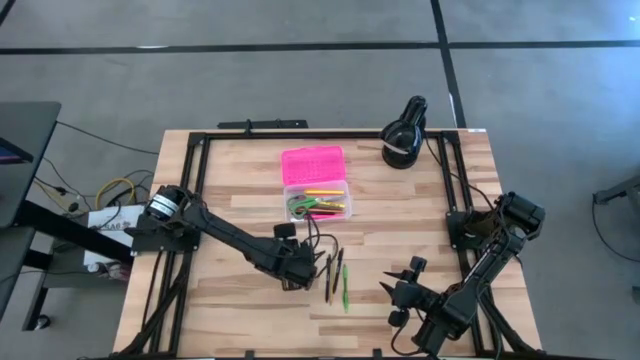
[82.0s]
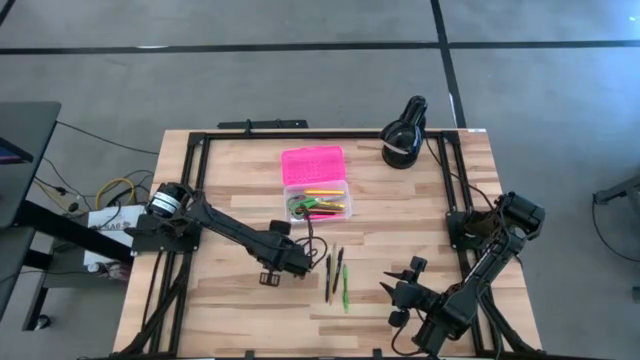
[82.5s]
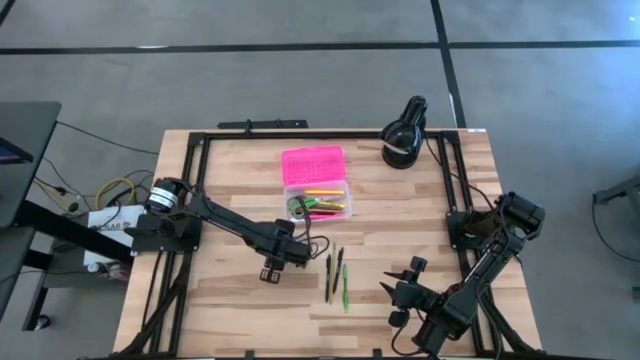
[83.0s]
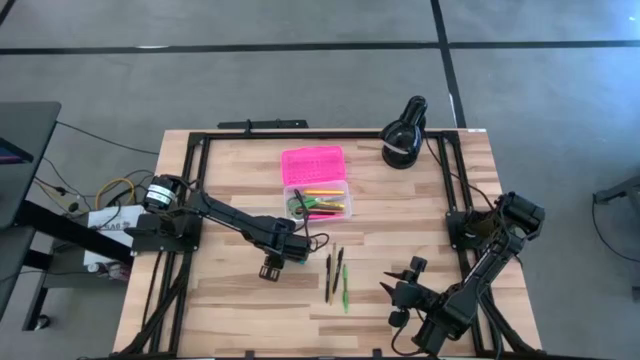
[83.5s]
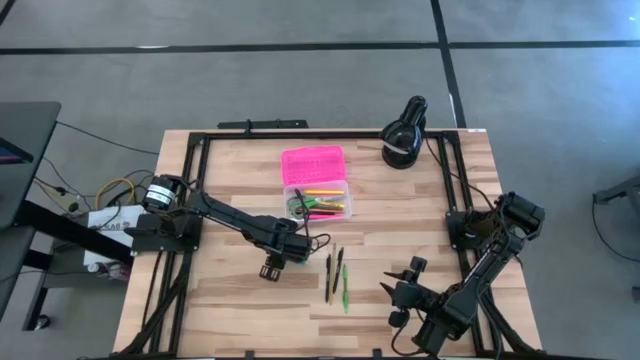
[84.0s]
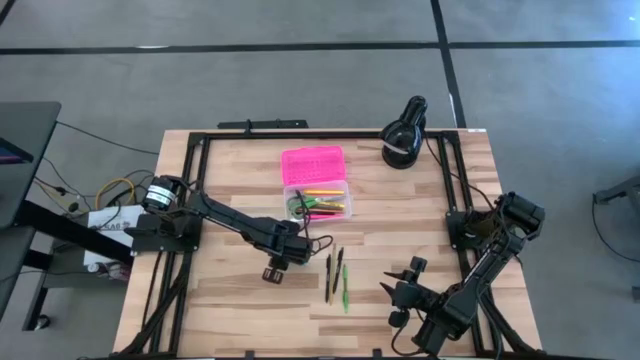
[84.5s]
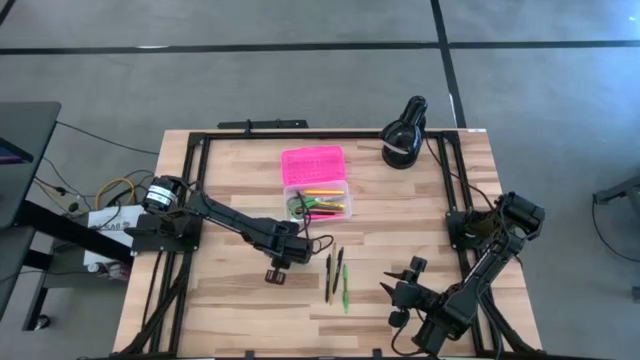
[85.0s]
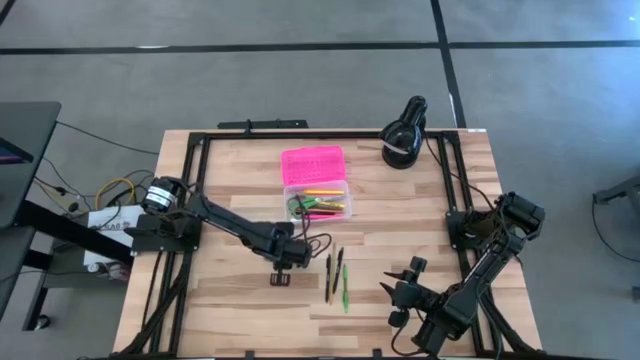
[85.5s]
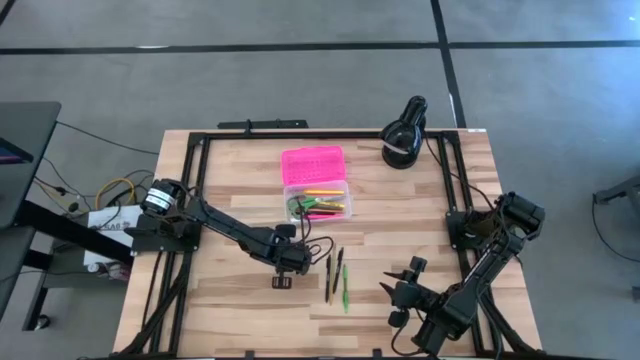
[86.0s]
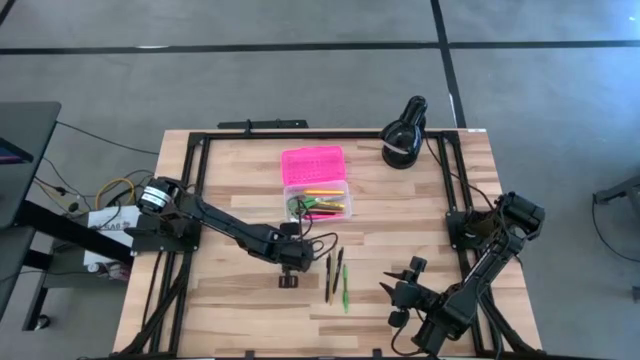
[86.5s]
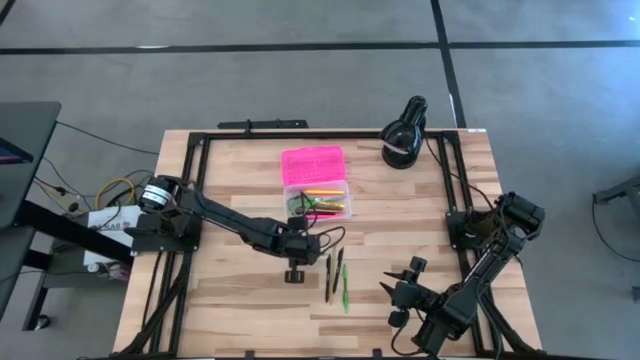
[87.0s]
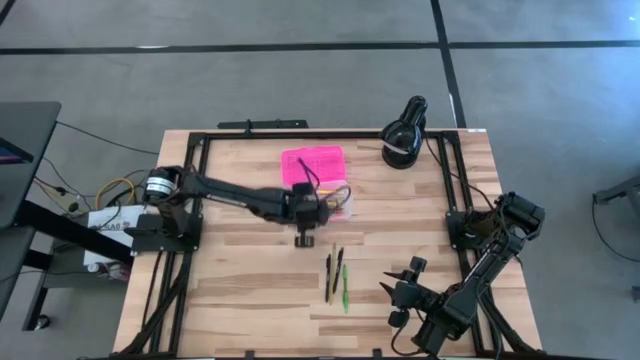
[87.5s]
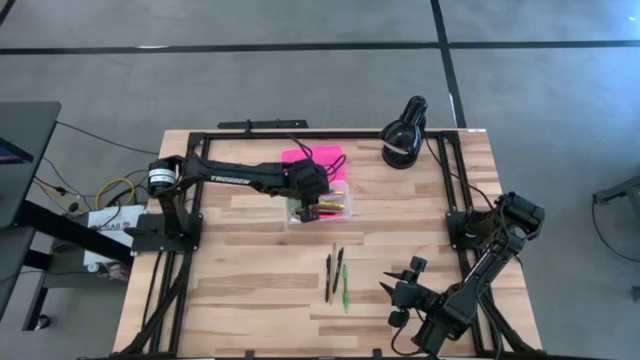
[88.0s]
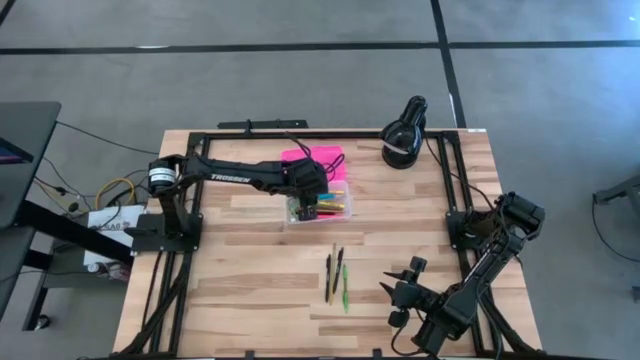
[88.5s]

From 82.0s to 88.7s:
Task: Pick & place school supplies into a supply box
Put the blue pen into the supply box

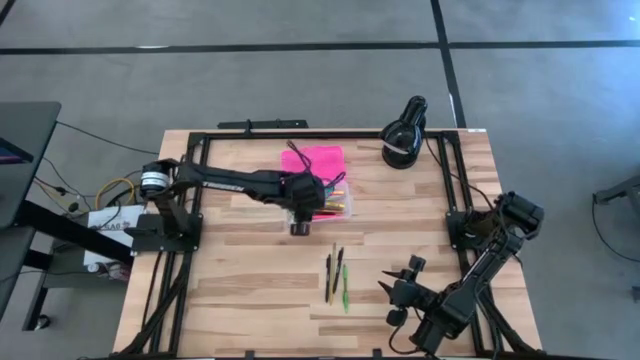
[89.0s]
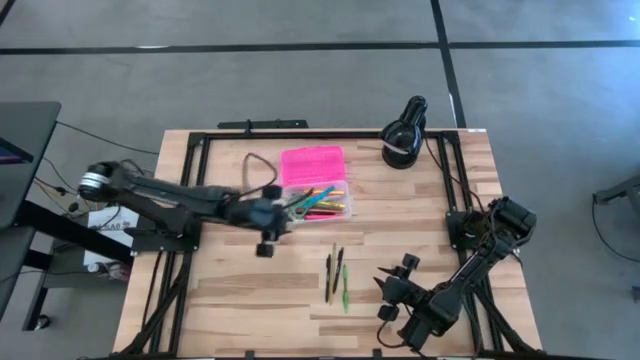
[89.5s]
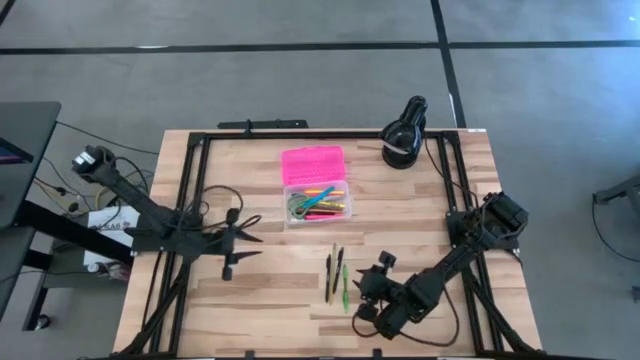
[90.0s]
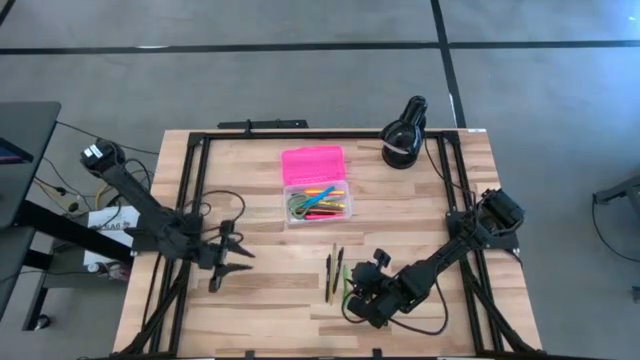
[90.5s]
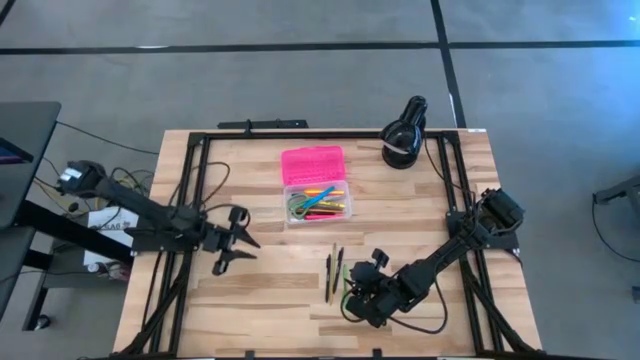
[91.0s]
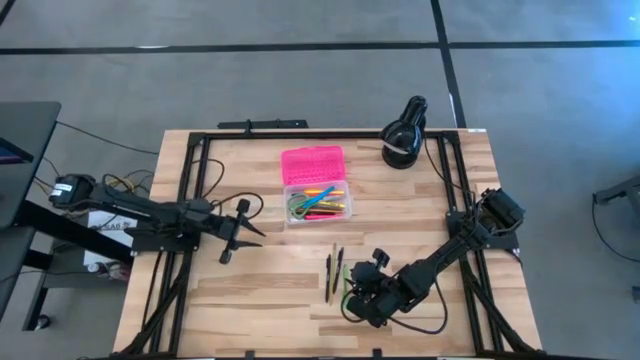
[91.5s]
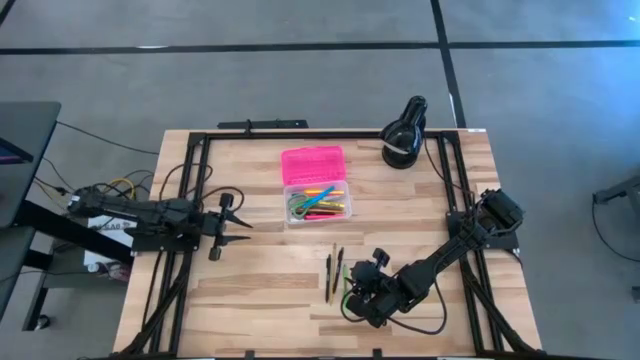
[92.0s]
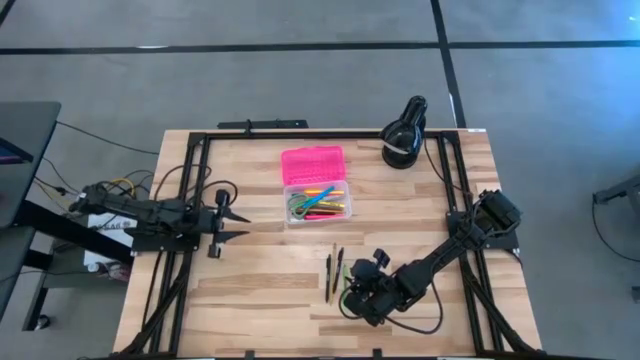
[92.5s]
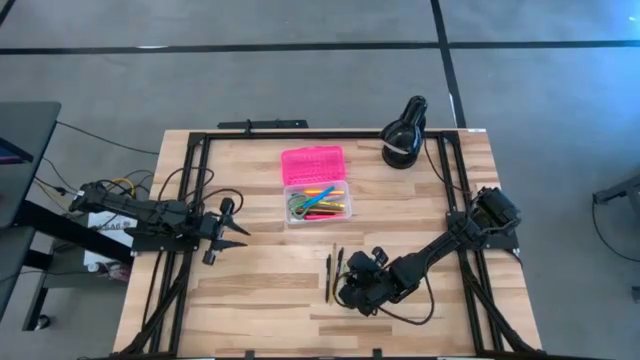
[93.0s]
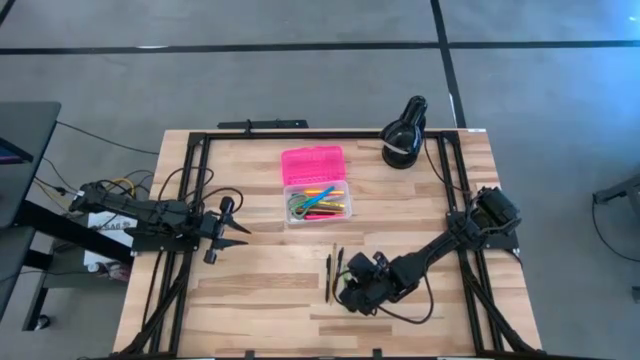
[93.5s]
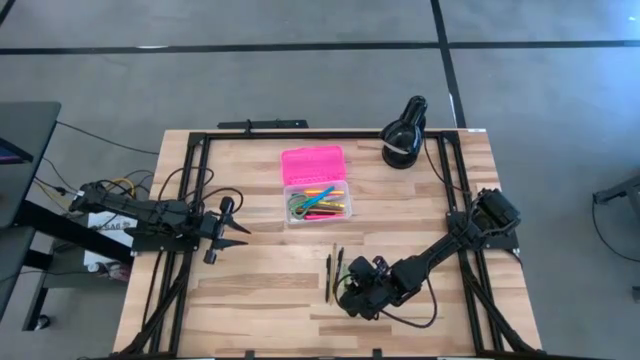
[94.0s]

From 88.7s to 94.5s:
Put the green pen into the supply box

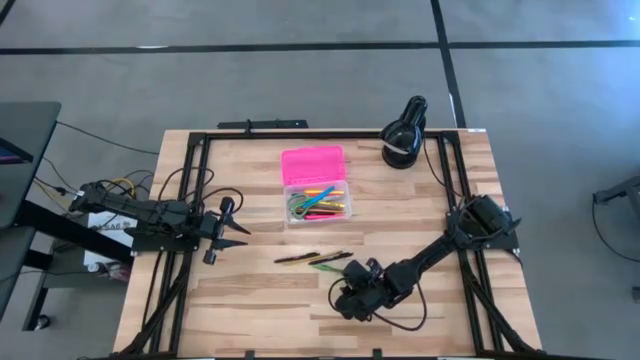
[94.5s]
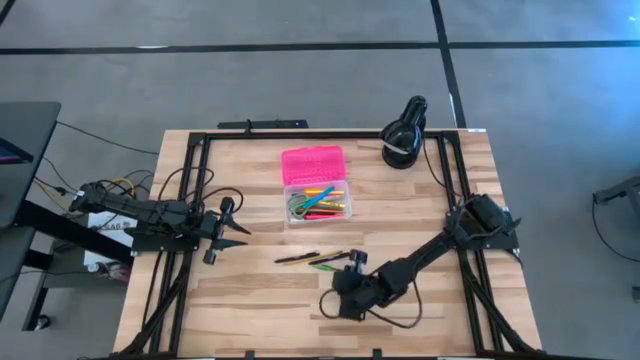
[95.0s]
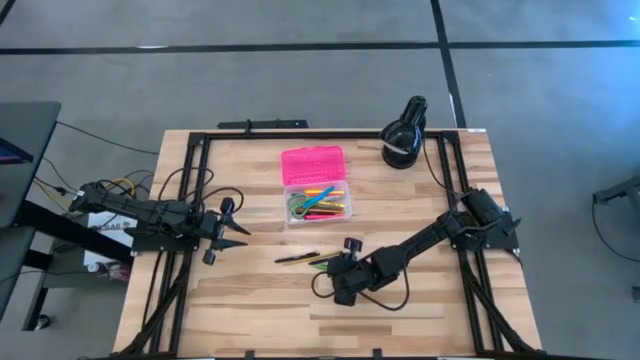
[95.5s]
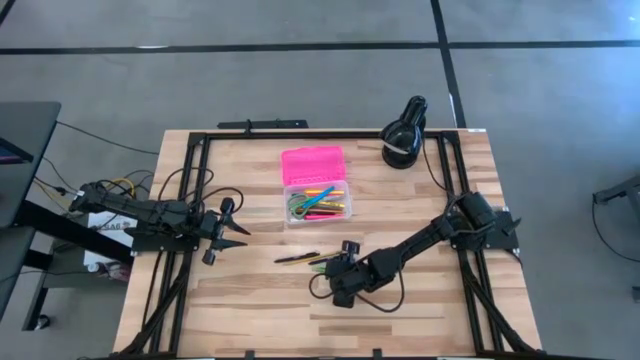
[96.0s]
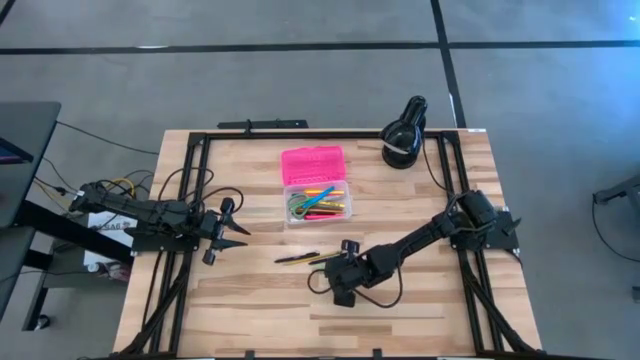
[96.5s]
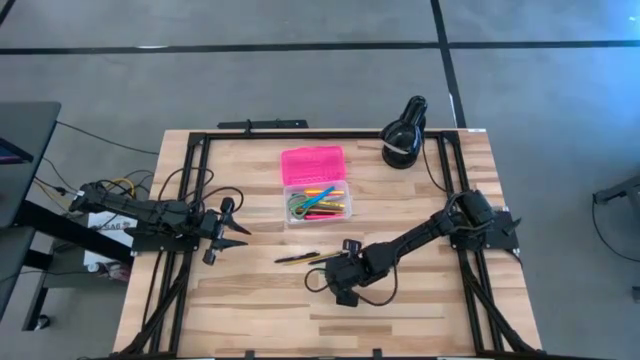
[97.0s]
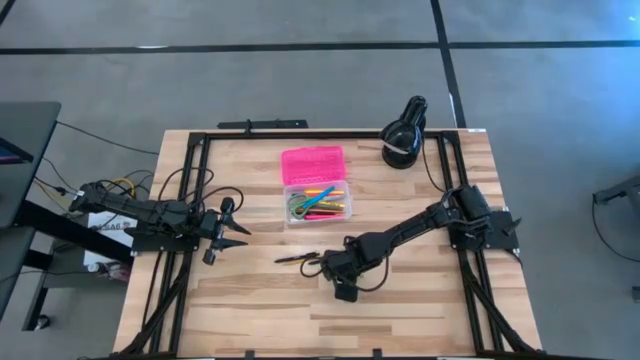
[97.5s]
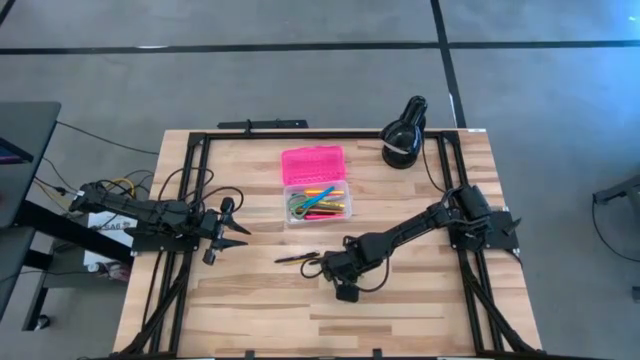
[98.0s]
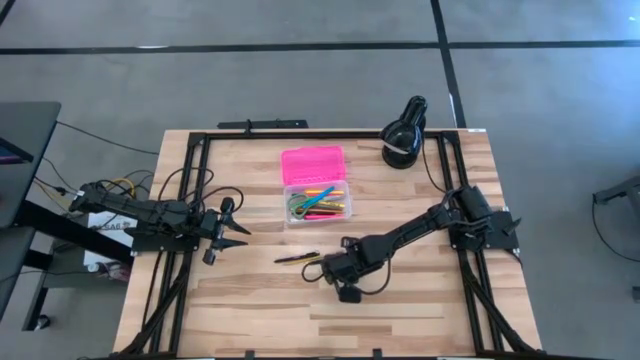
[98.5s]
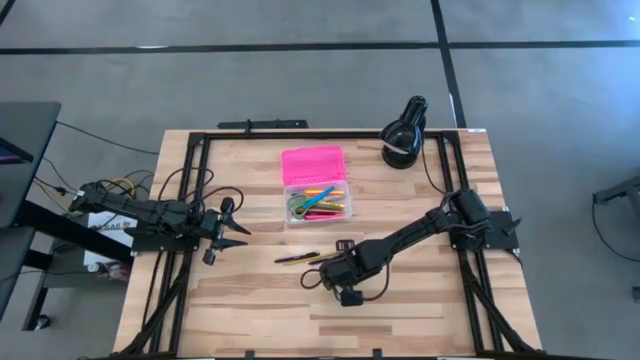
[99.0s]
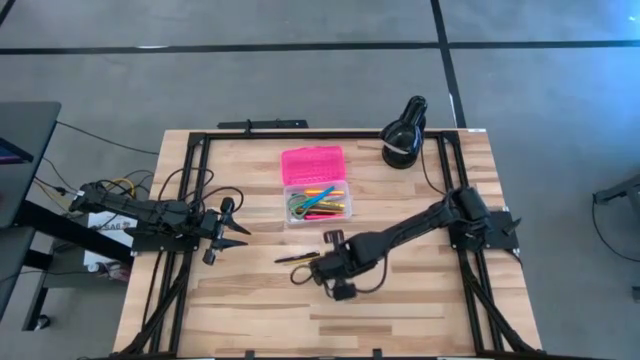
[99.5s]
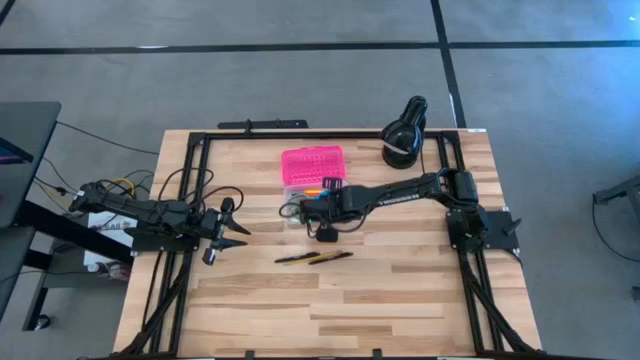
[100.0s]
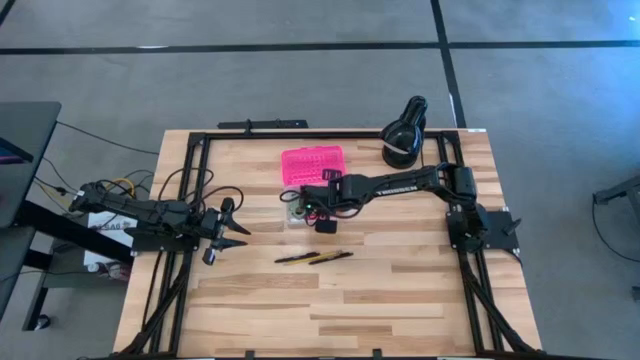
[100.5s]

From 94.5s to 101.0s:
Put the green pen into the supply box

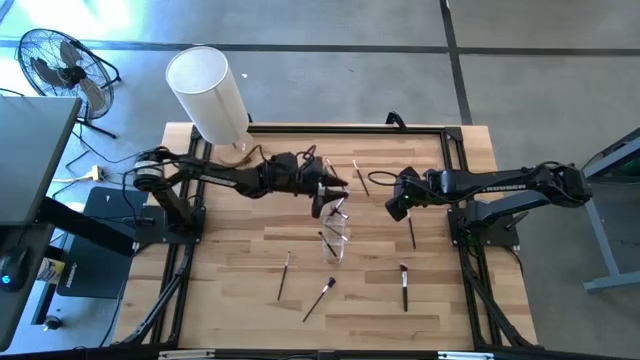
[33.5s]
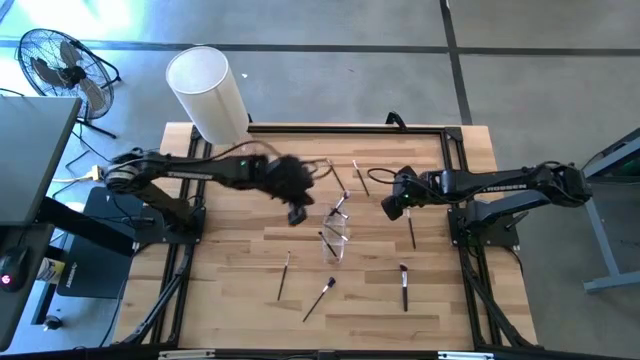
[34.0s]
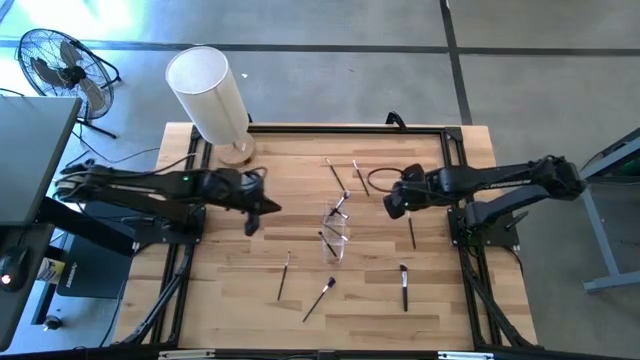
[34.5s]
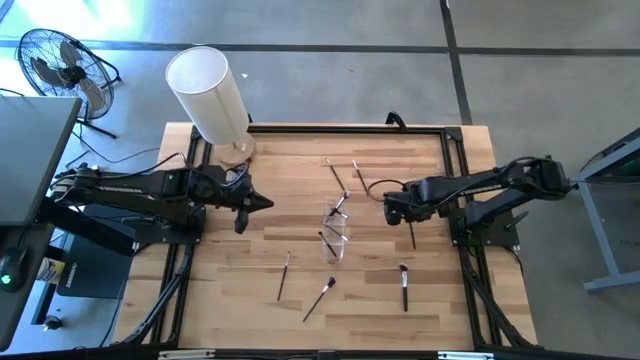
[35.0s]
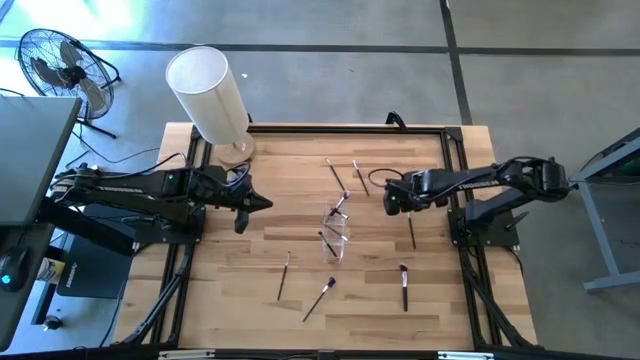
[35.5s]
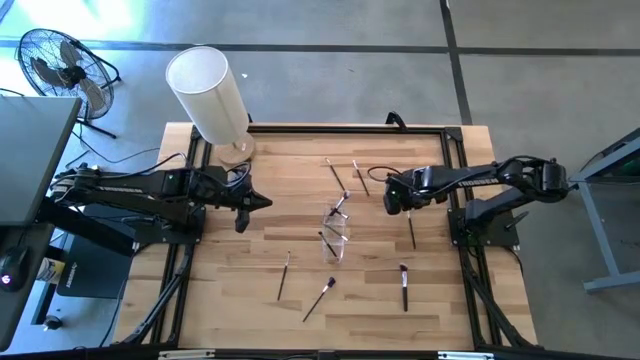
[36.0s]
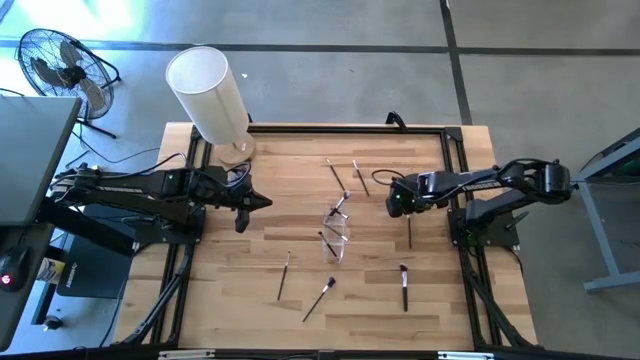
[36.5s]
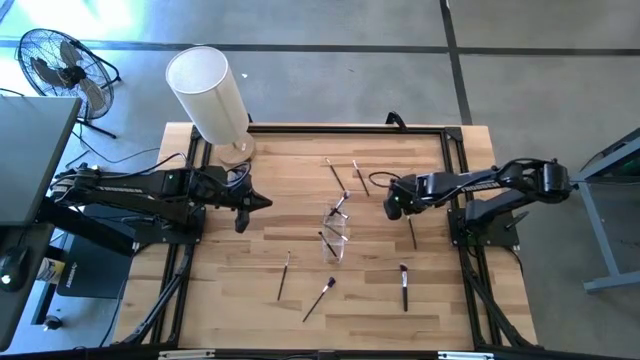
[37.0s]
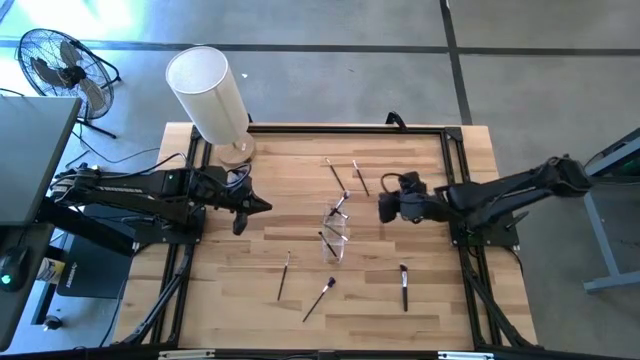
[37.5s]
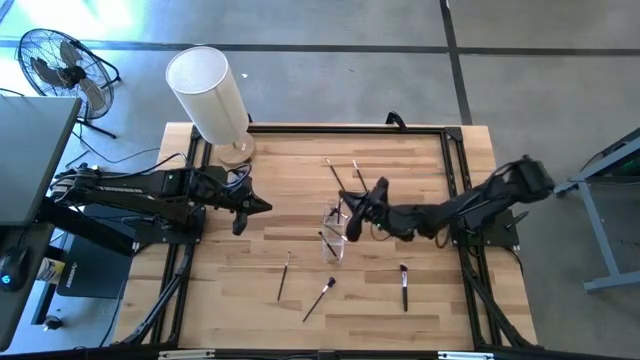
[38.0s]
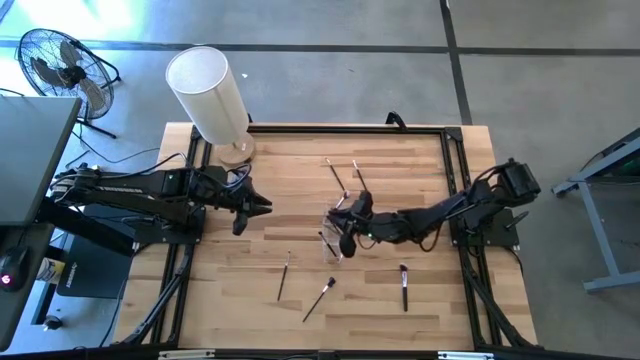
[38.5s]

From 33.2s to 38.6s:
Task: Pick & Place Makeup Brushes
Put the eyeshadow brush into the transparent organizer
